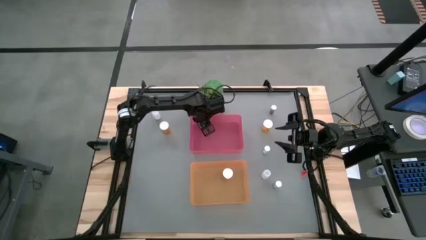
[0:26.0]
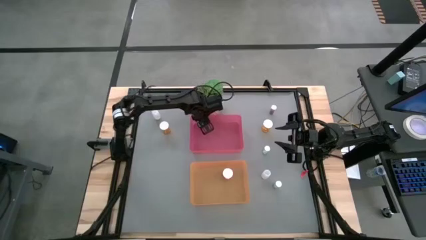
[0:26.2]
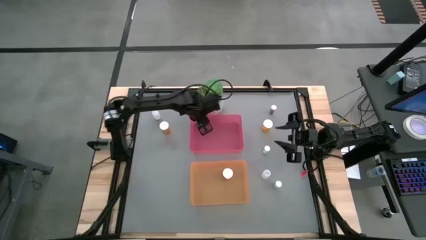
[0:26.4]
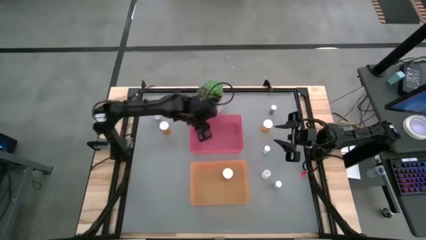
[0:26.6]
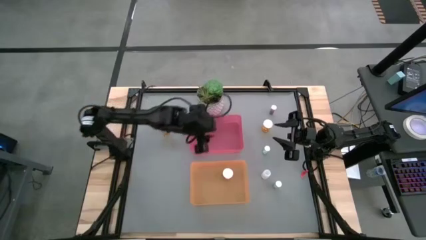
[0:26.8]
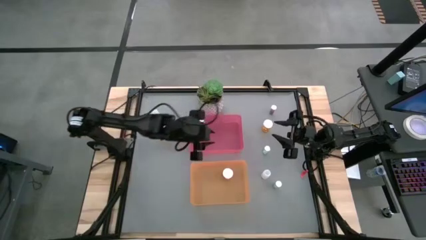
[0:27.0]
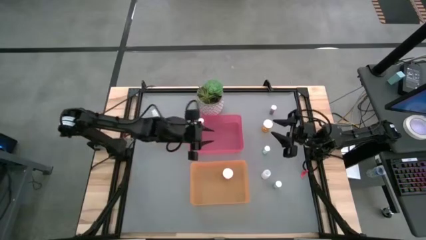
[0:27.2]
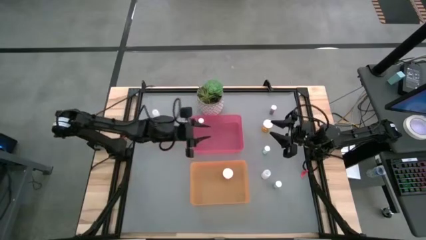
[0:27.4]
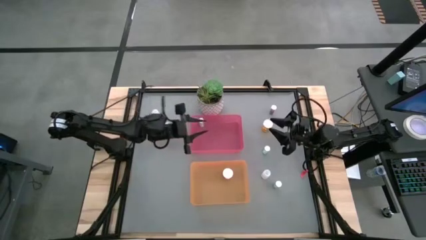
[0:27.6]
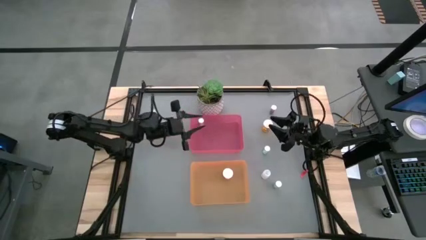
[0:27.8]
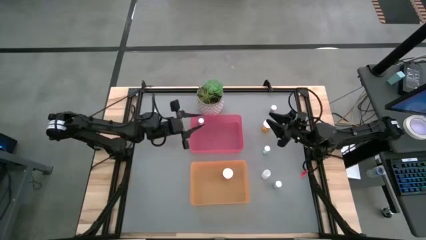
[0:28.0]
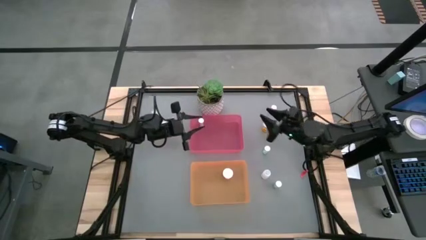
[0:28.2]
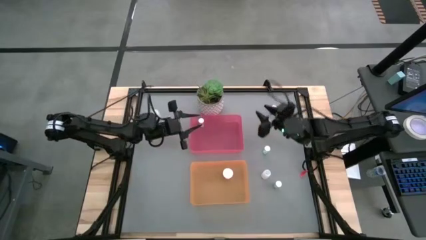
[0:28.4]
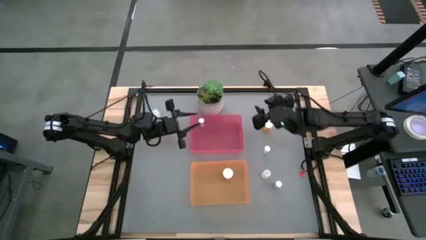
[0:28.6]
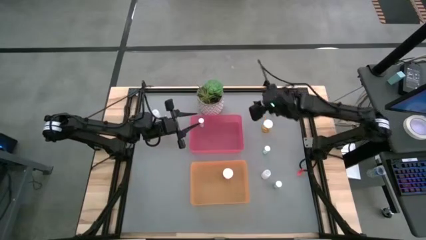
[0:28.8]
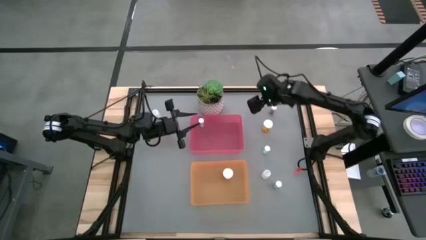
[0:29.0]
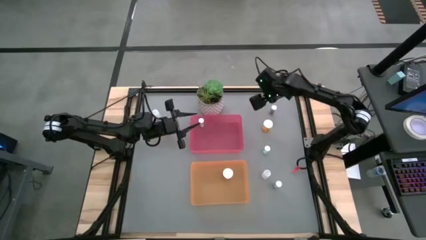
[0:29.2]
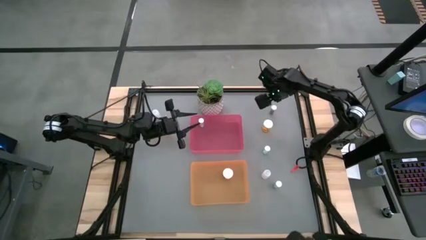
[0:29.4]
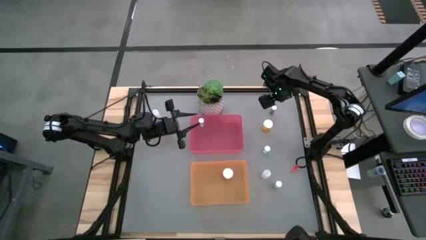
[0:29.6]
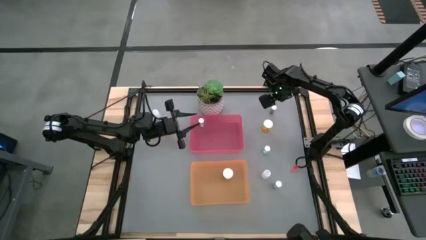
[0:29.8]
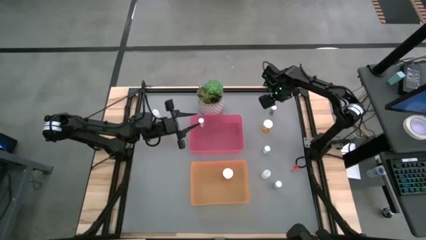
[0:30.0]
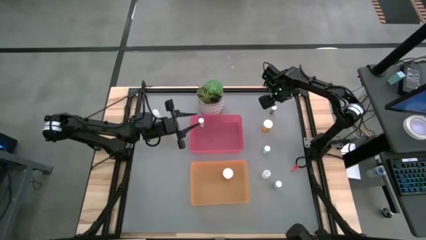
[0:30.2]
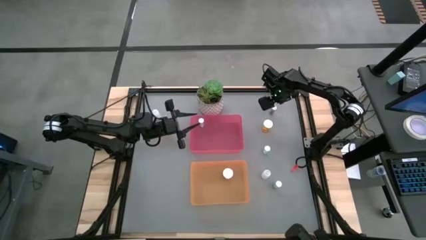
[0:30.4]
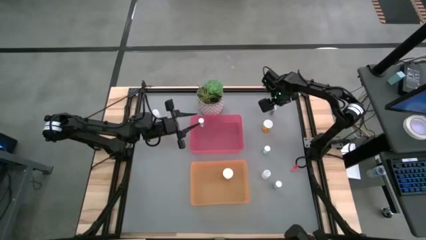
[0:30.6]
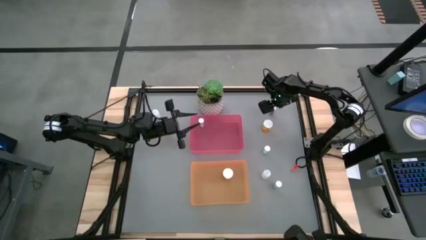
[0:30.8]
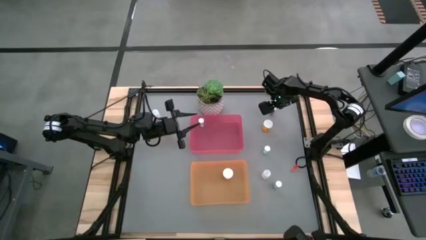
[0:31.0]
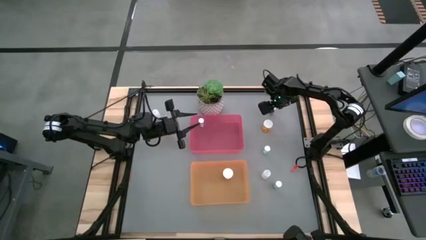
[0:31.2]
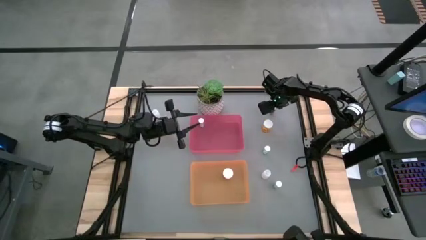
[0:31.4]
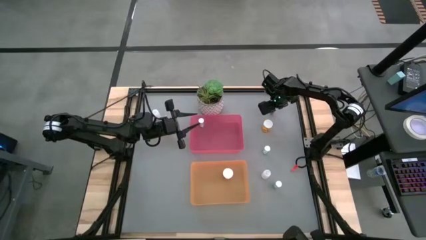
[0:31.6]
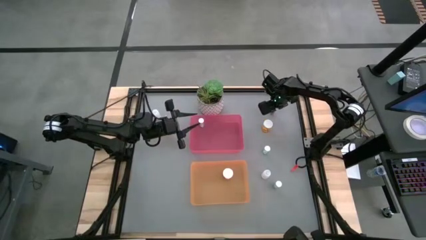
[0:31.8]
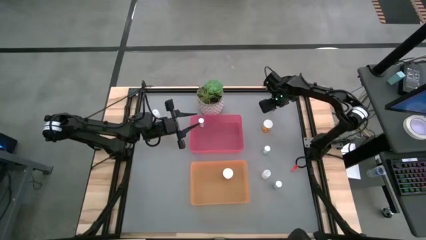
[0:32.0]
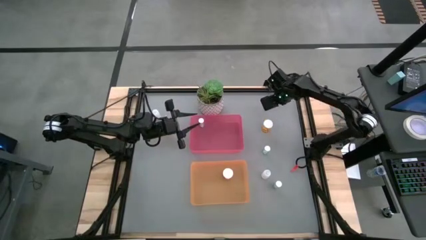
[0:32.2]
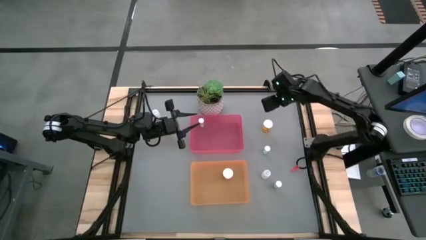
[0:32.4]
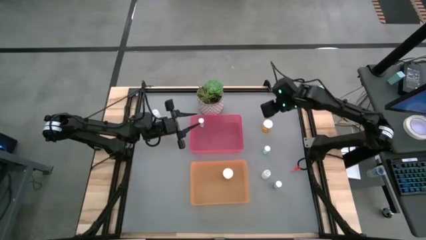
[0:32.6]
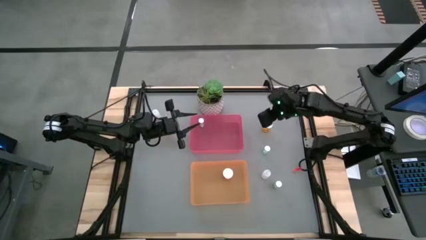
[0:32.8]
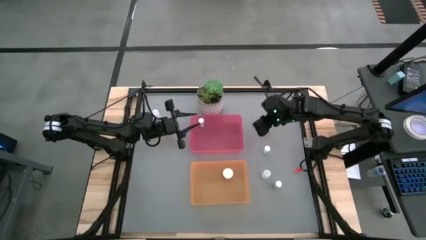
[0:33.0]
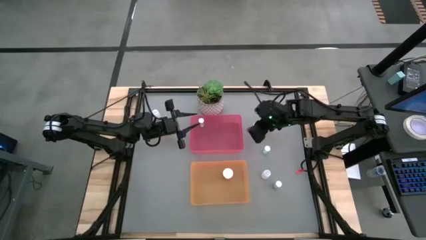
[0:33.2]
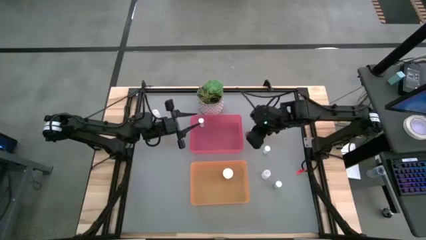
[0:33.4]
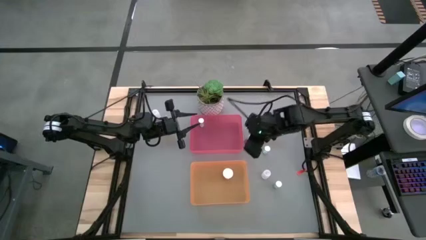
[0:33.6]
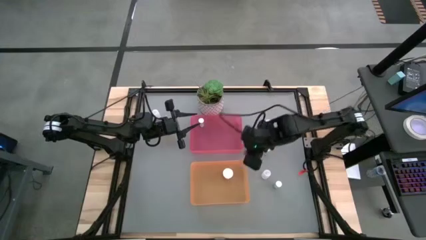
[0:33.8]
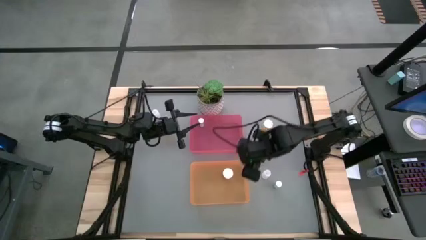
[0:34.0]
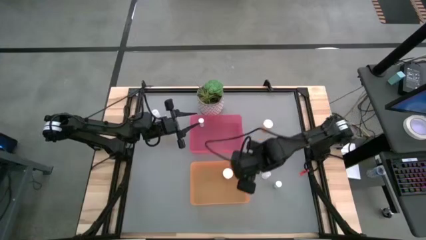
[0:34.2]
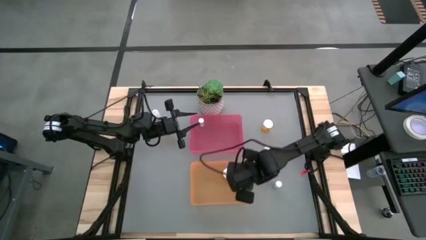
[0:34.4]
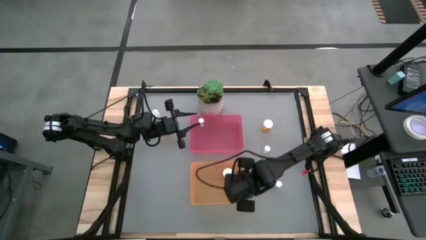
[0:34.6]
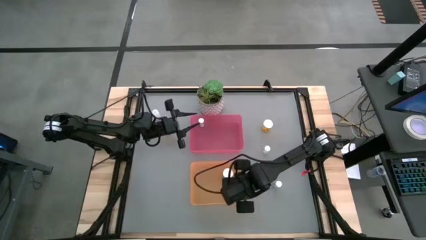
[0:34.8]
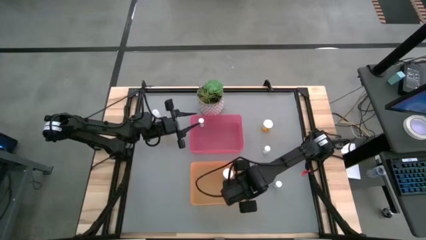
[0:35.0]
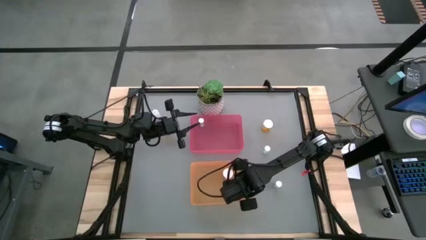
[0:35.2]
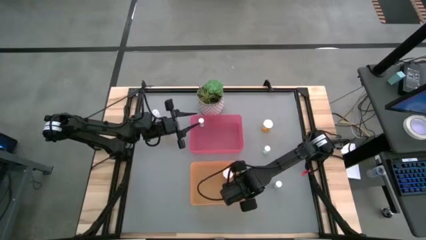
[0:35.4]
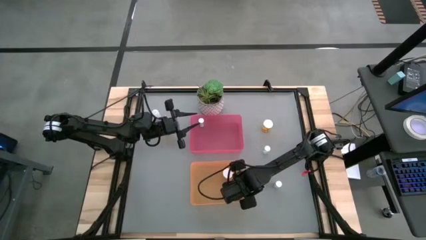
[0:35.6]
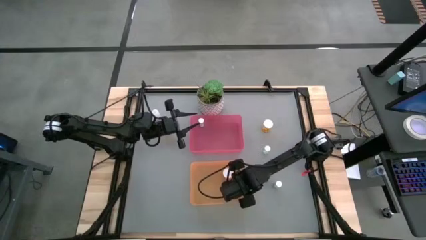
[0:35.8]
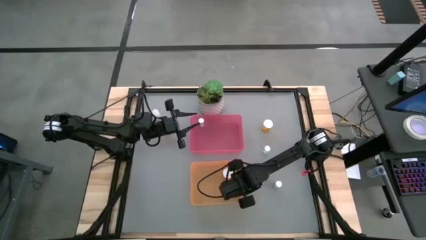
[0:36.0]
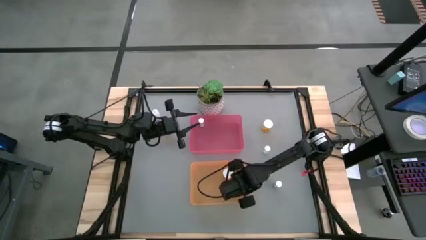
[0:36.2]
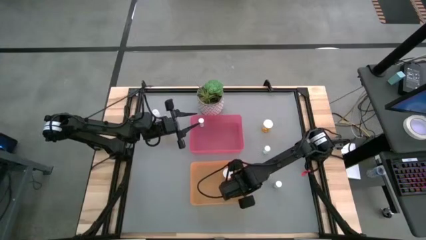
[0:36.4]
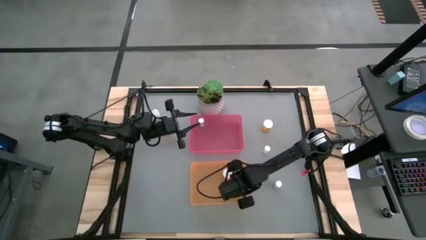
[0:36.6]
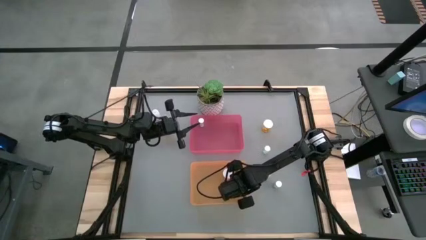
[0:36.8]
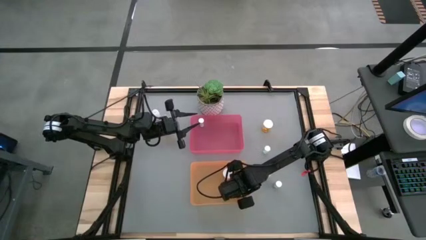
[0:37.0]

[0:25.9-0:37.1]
Task: Pick and place medicine bottles into bin by pill shape (circle, oval)
Put the blue capsule bottle into the orange bin
